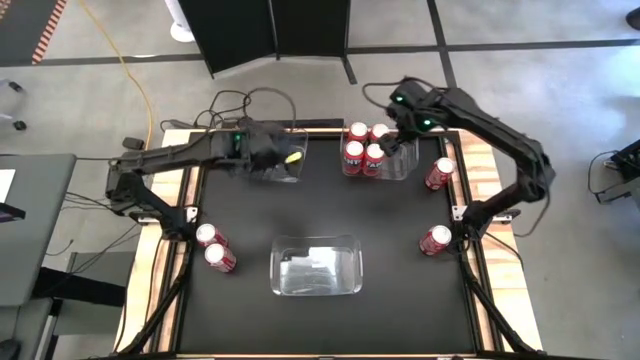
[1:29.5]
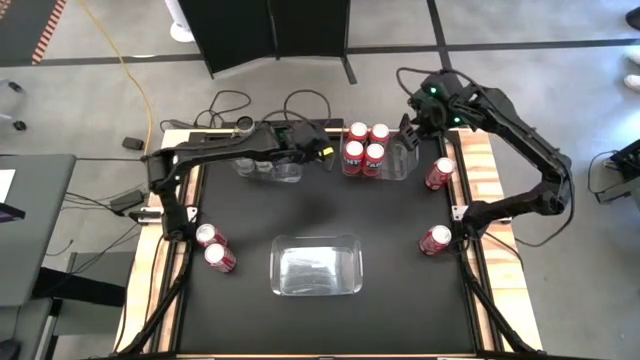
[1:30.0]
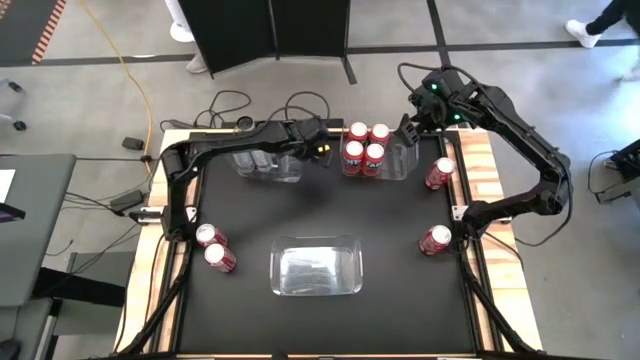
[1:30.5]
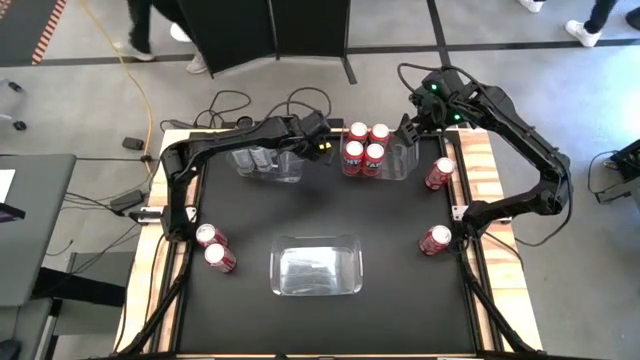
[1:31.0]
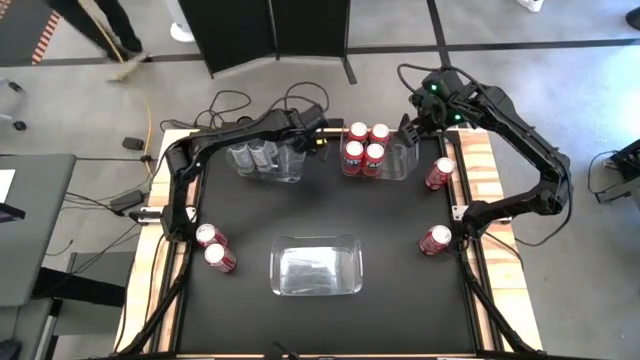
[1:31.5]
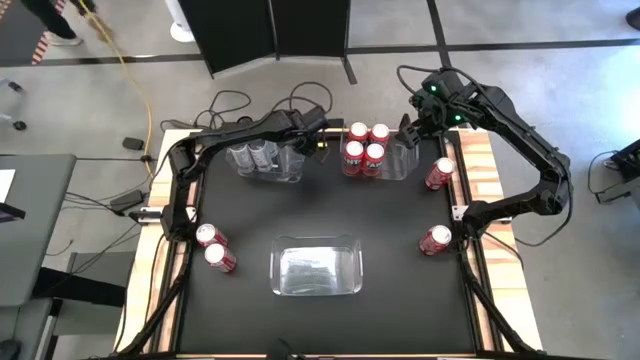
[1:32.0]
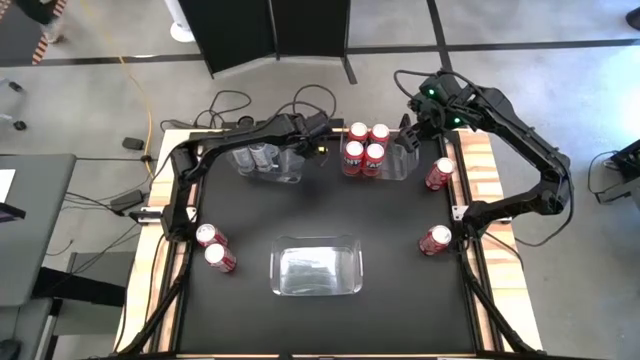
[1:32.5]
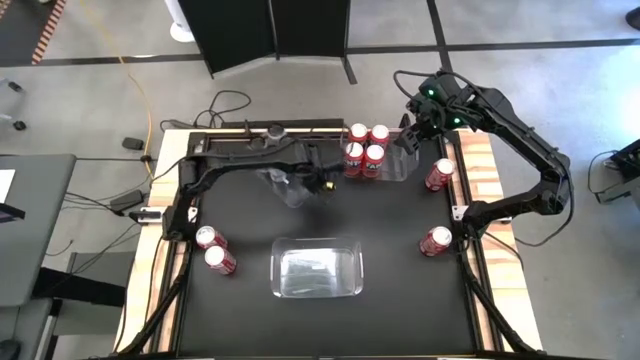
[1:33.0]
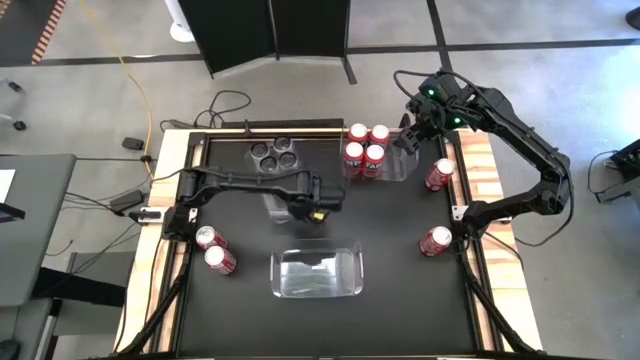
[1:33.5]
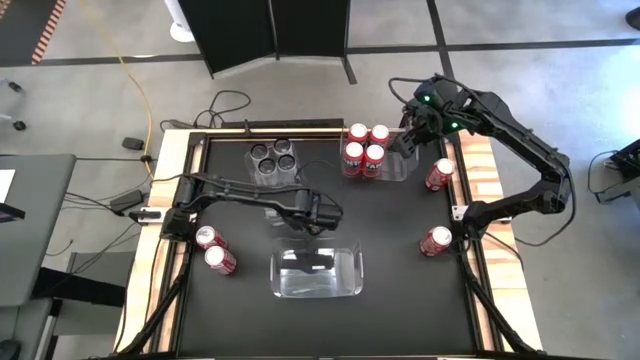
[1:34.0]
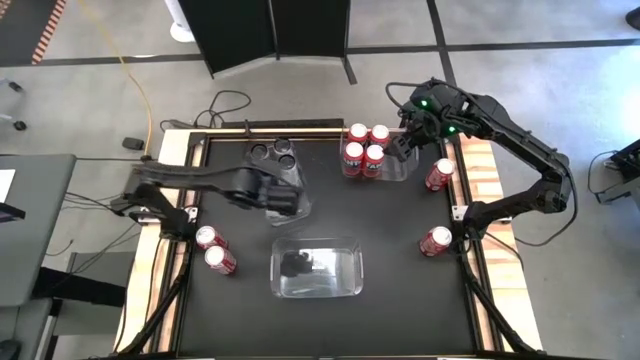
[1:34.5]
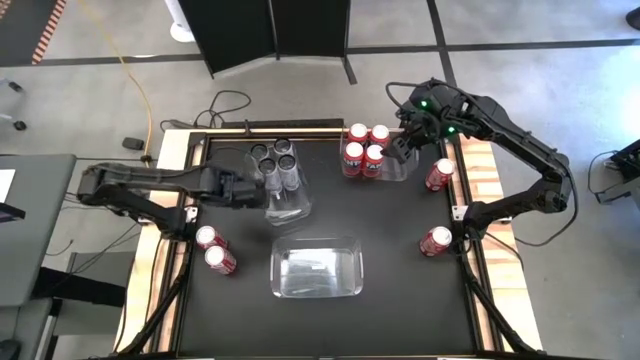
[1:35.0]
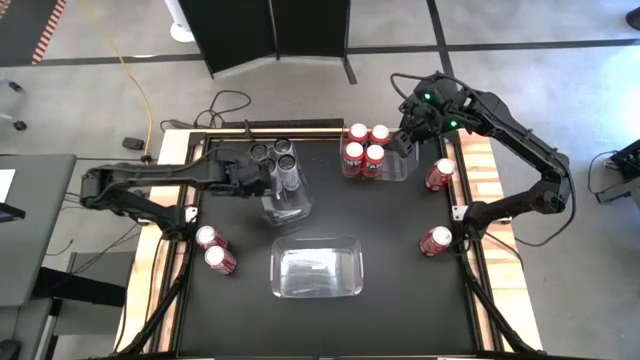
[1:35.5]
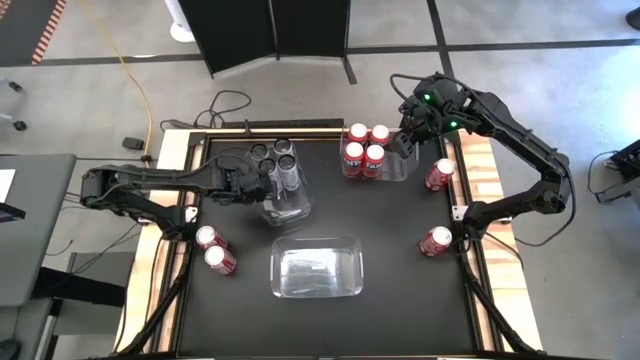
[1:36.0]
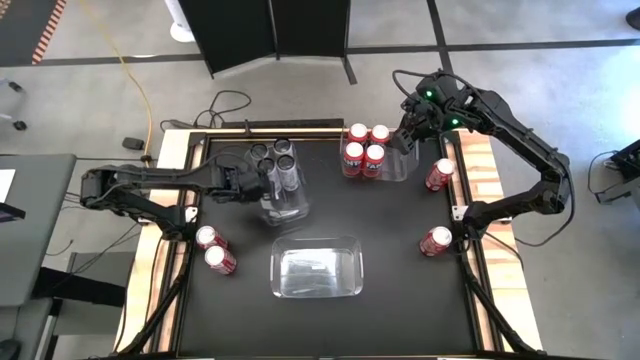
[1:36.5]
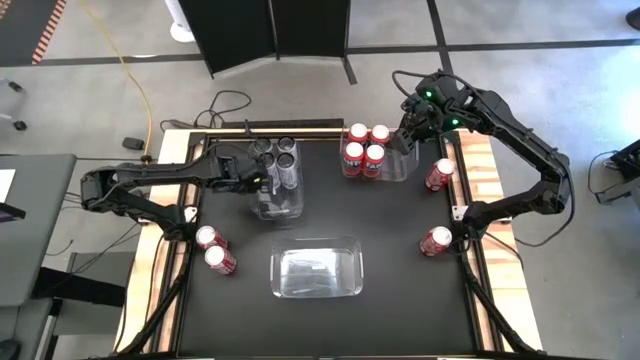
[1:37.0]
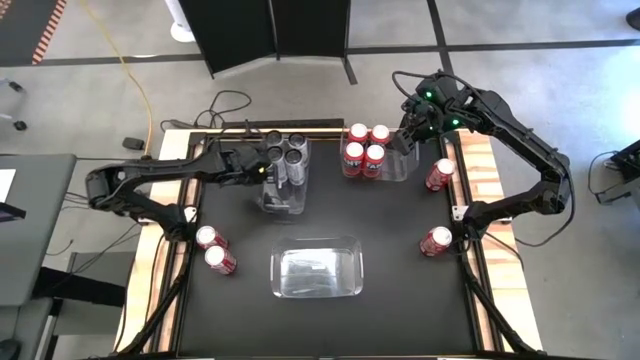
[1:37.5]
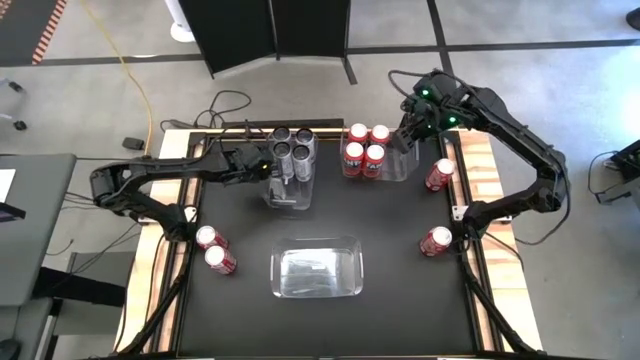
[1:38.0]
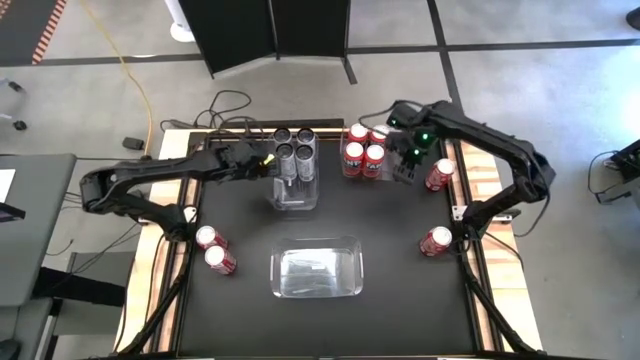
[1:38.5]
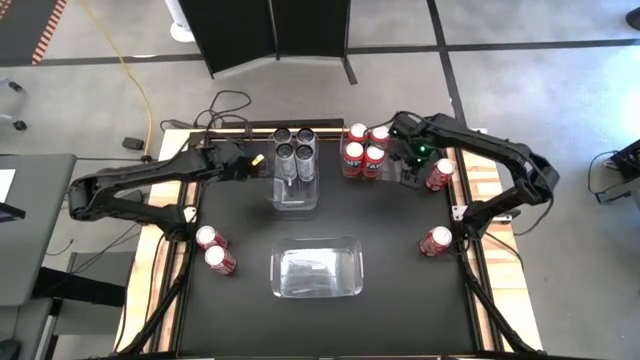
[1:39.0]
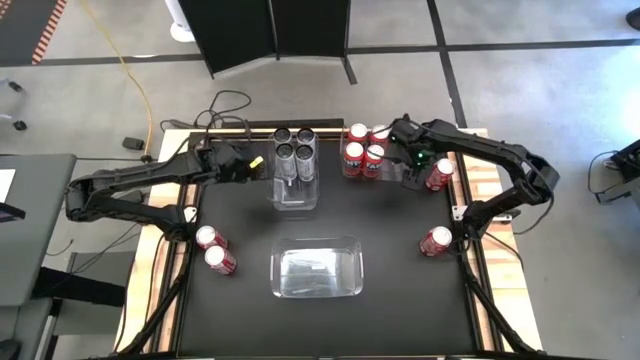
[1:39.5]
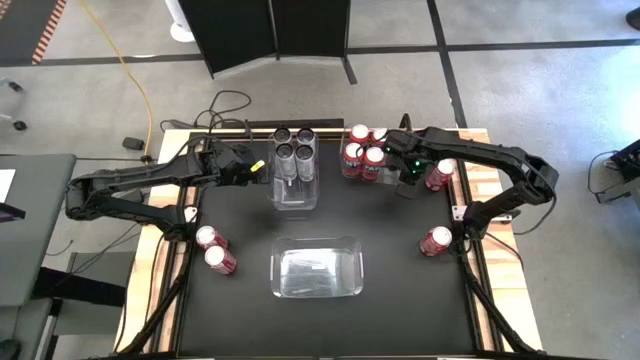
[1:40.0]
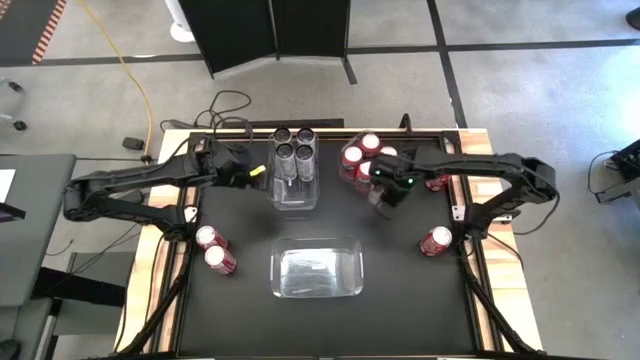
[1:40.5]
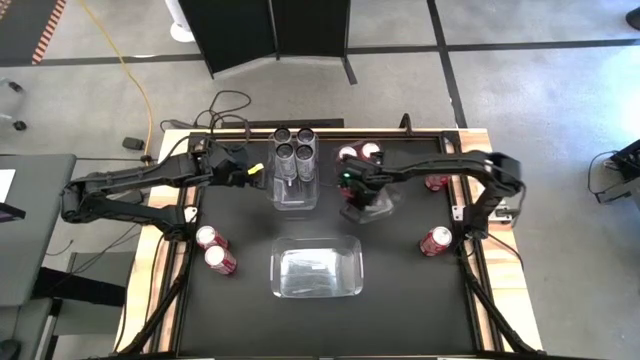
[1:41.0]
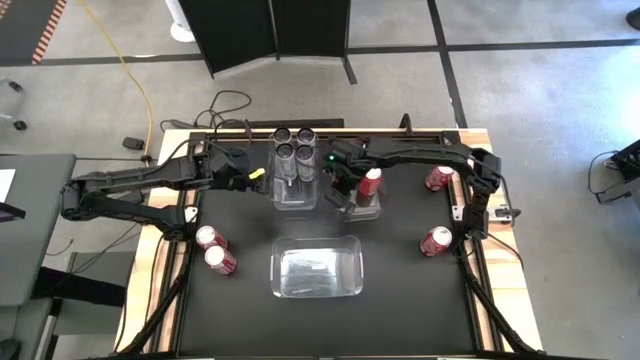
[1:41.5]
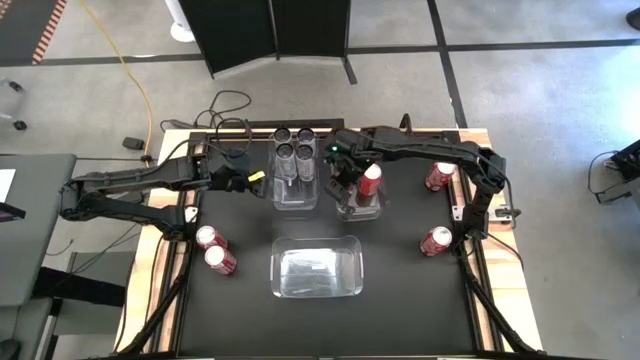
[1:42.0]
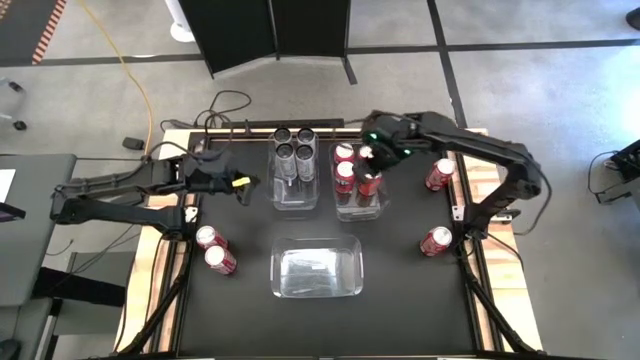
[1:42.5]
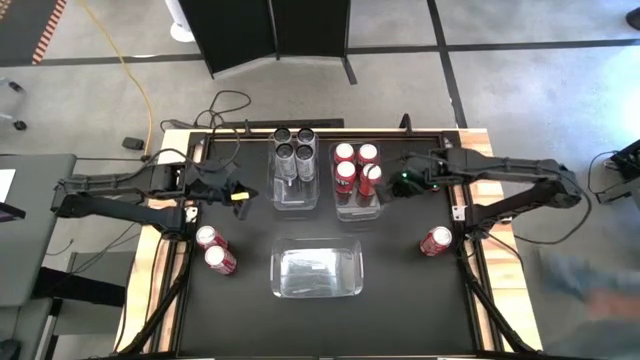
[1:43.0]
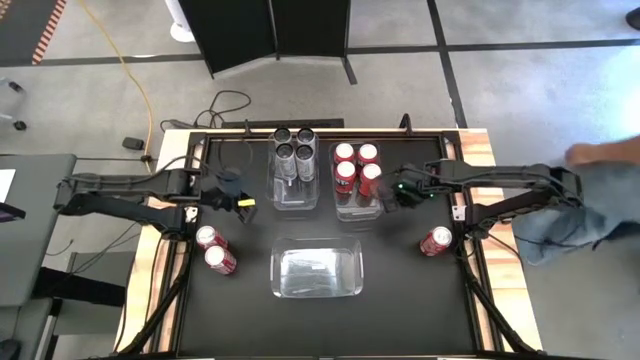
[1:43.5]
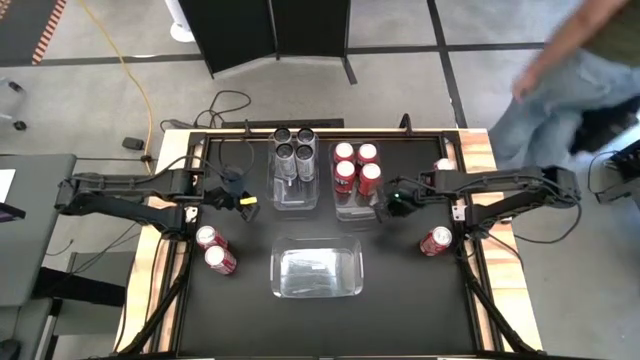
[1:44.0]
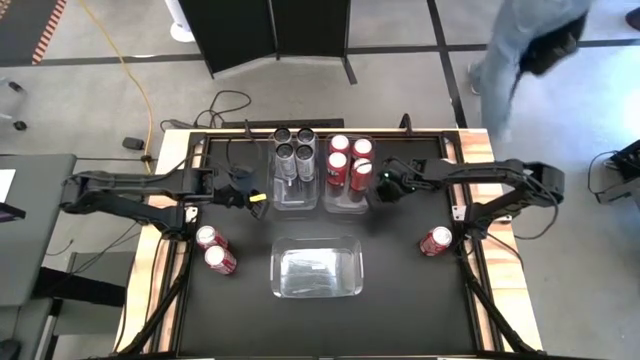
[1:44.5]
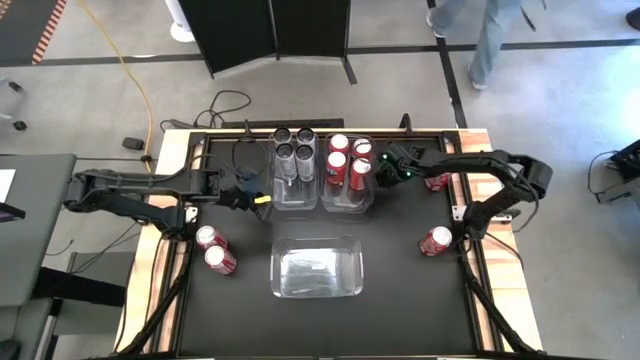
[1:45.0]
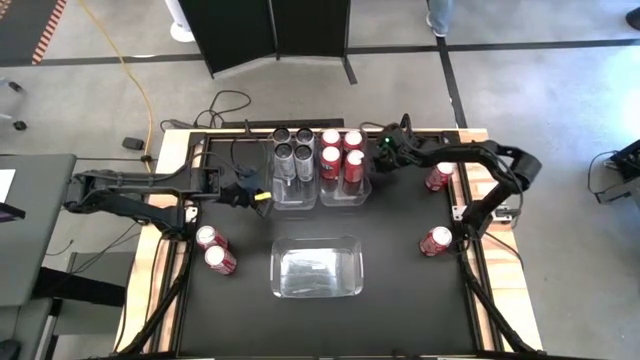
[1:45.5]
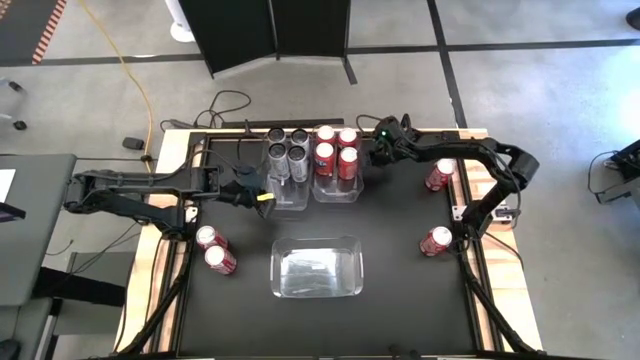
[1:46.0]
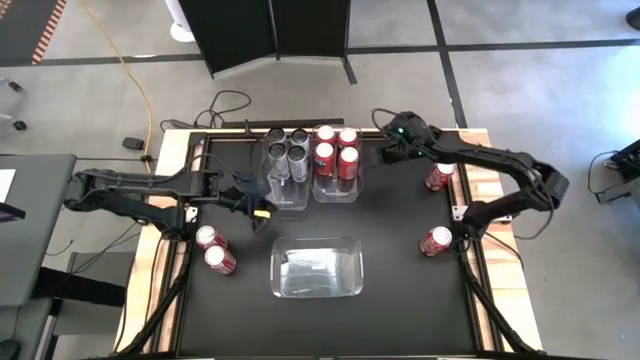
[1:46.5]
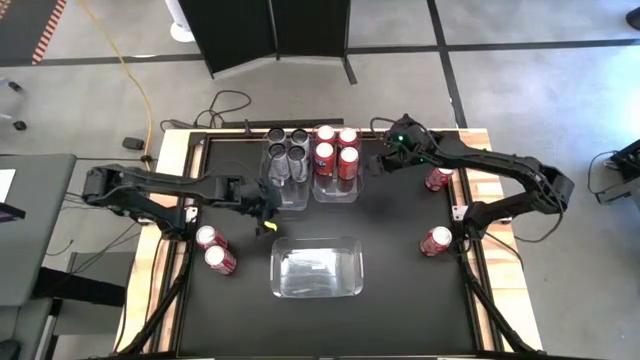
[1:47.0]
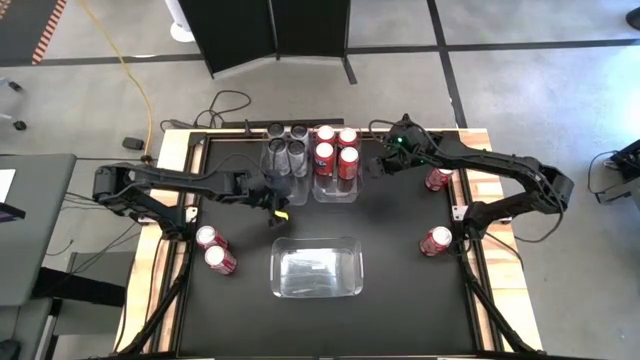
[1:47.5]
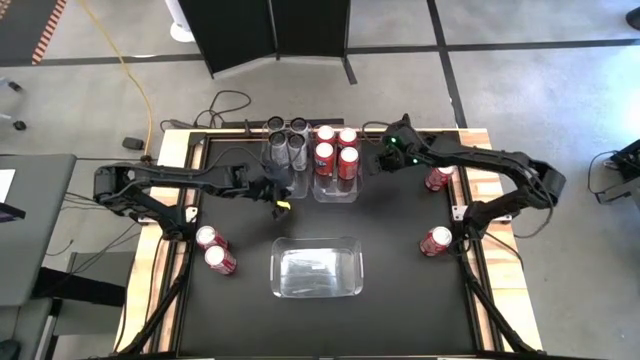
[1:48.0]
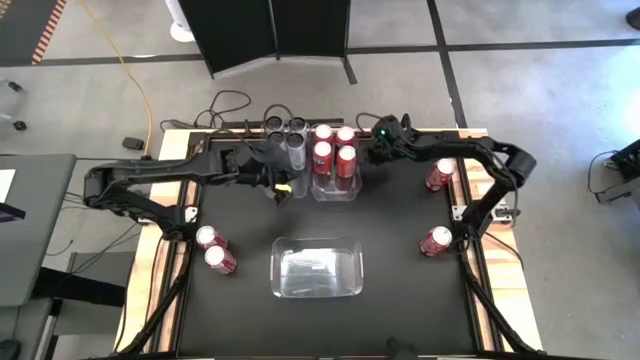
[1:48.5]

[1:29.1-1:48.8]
Task: Sort soda cans
Adjust the top left and top right transparent bin and align them on the table

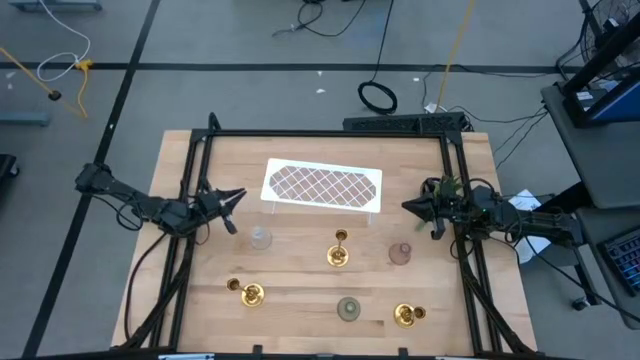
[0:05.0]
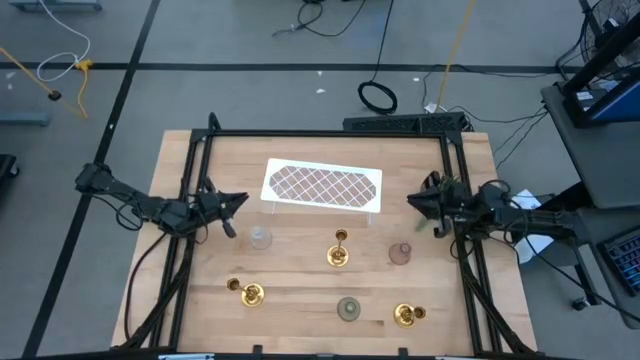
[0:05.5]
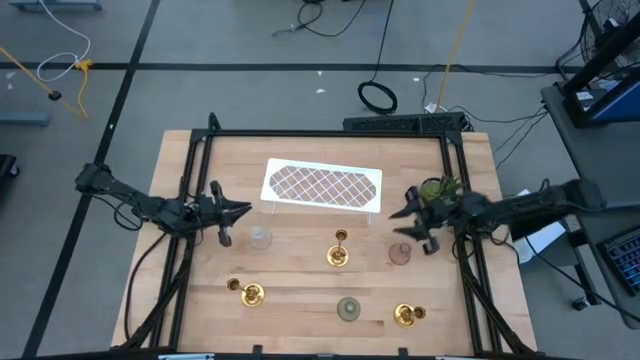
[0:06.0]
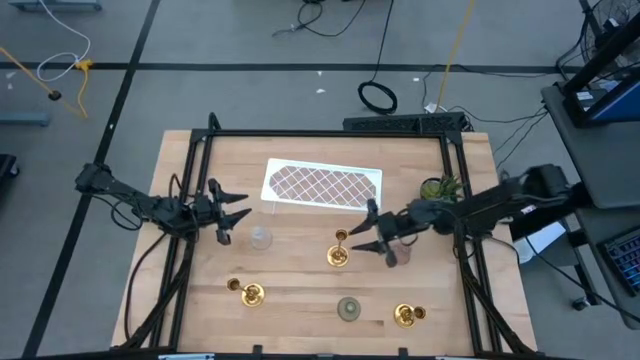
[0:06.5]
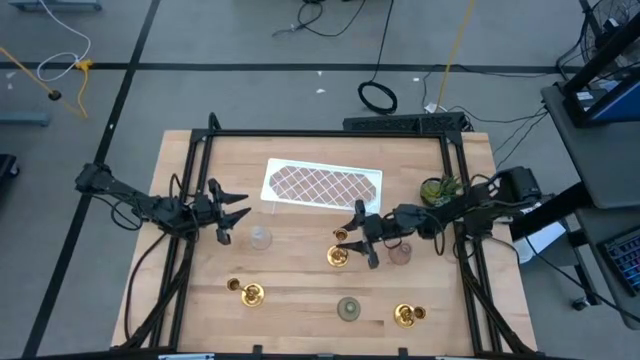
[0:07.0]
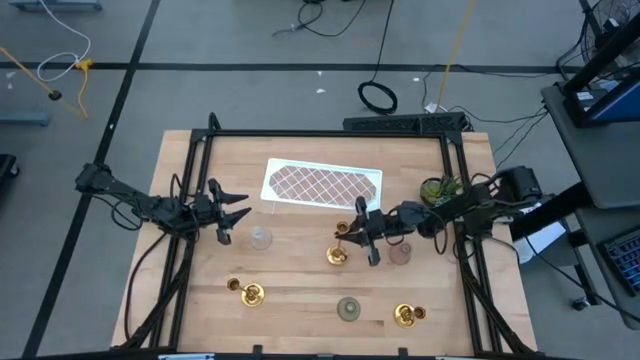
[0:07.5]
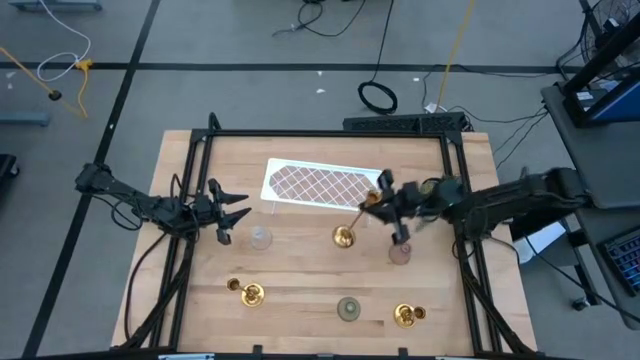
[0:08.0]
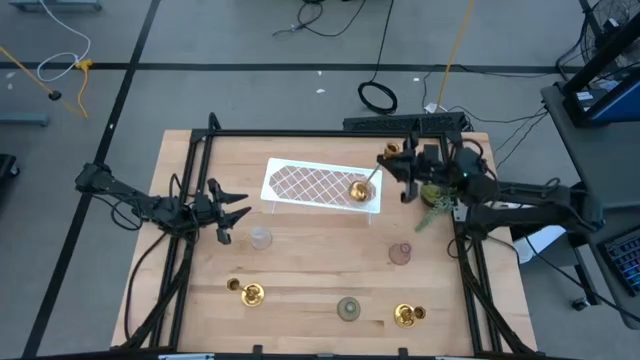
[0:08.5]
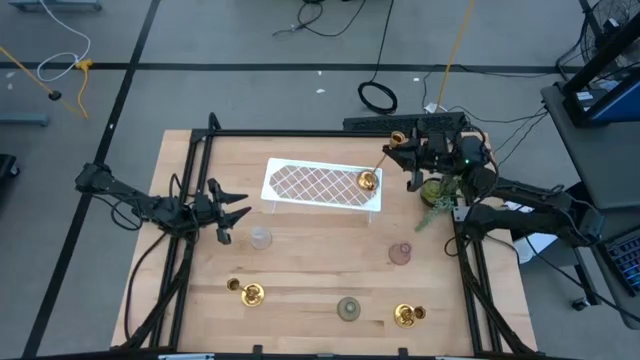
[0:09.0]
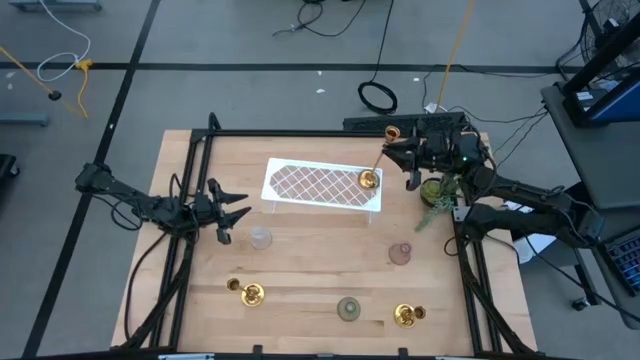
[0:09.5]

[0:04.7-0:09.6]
Task: Pick & Place candle stick holders
Put the top gold candle holder on the shelf
